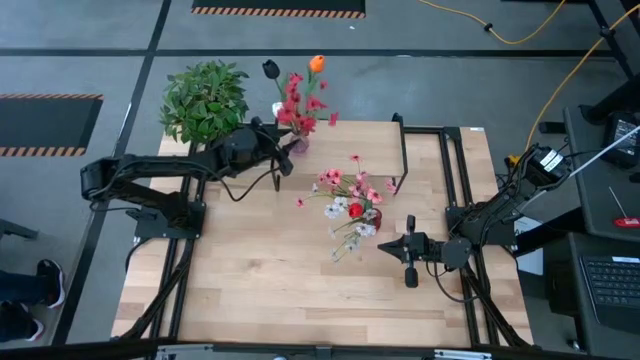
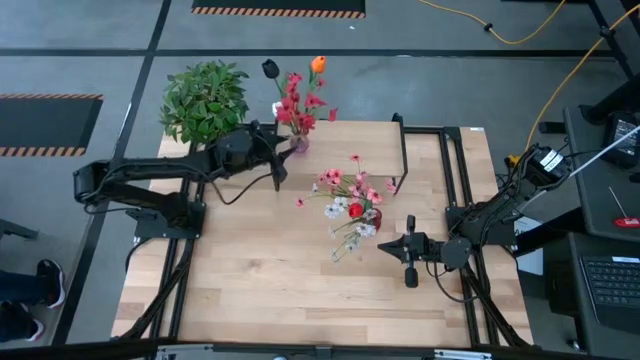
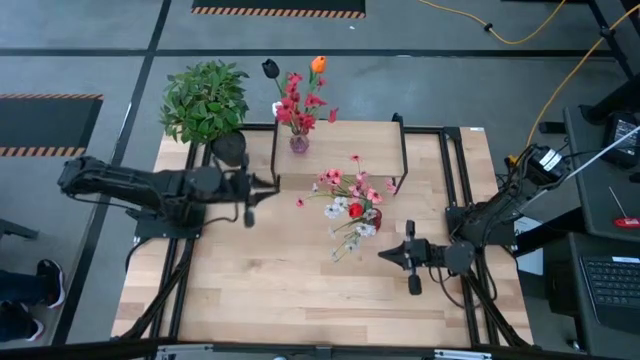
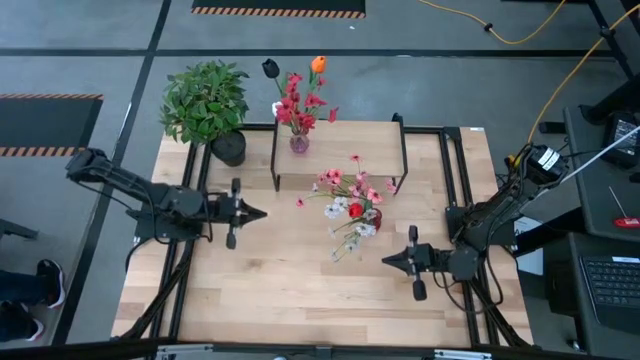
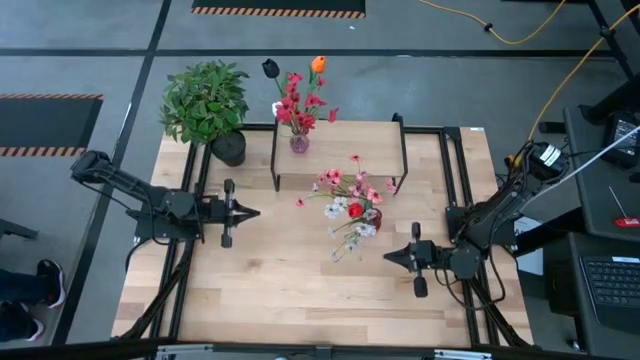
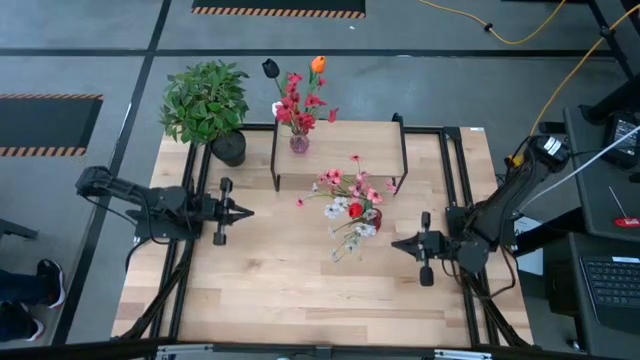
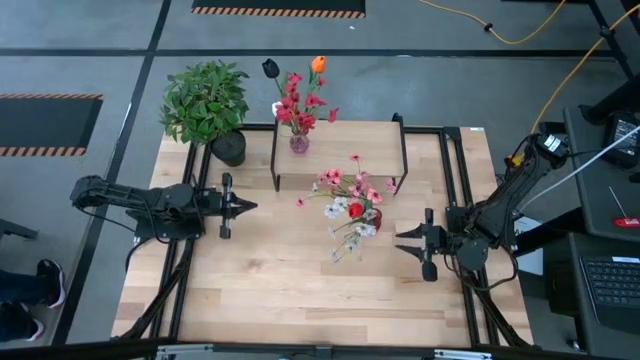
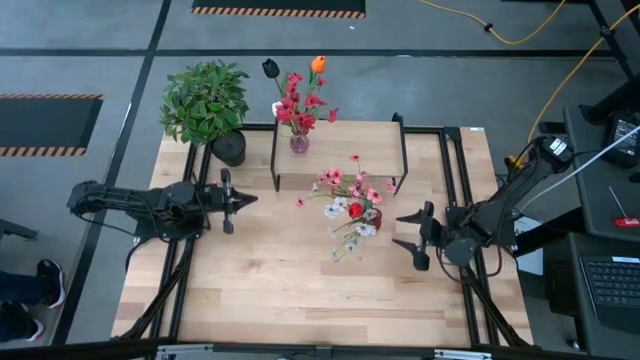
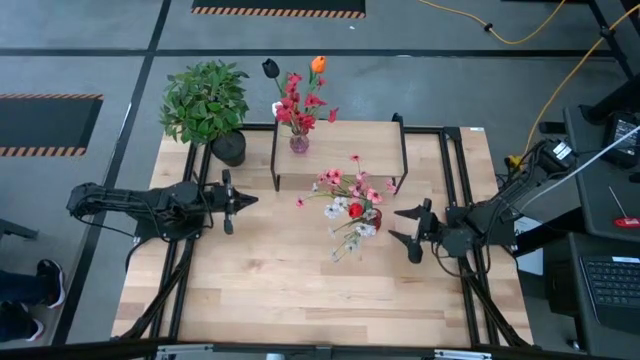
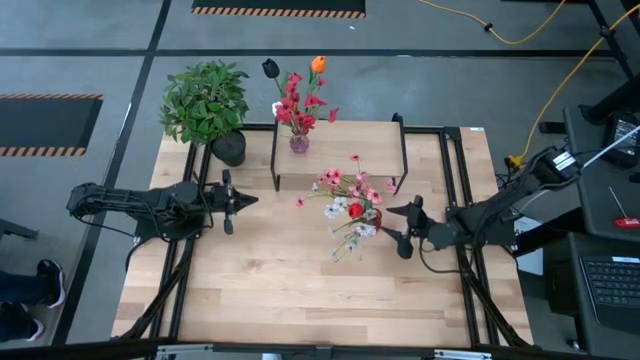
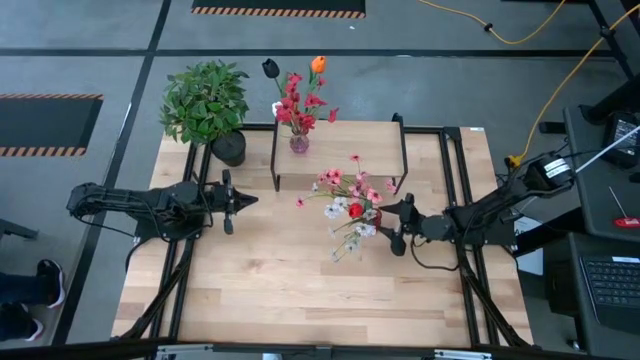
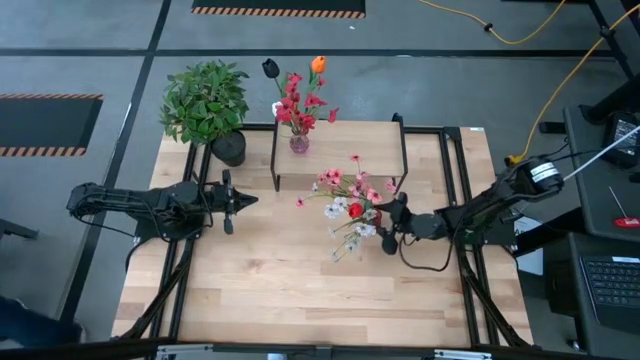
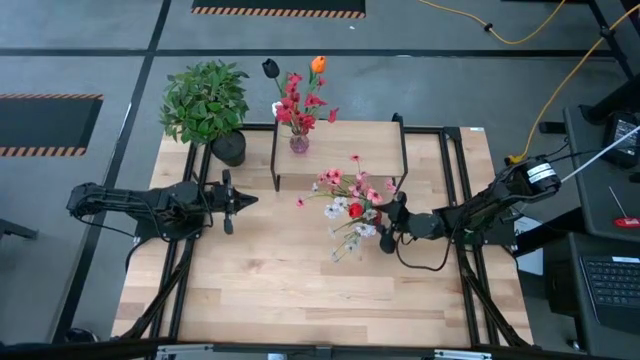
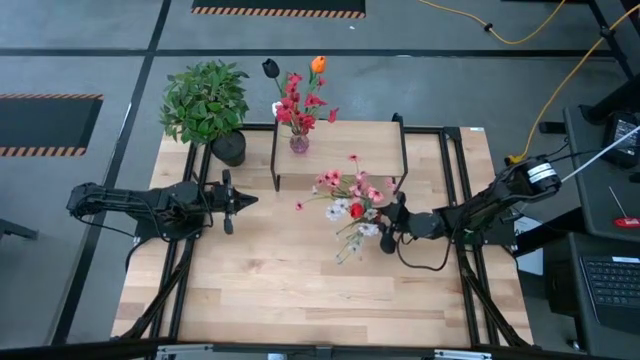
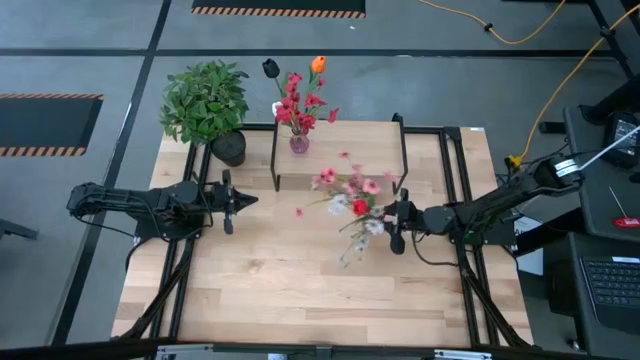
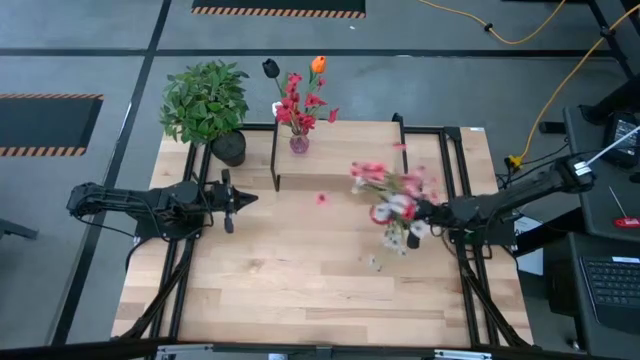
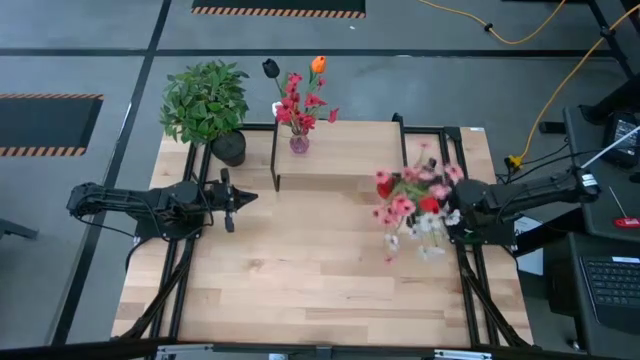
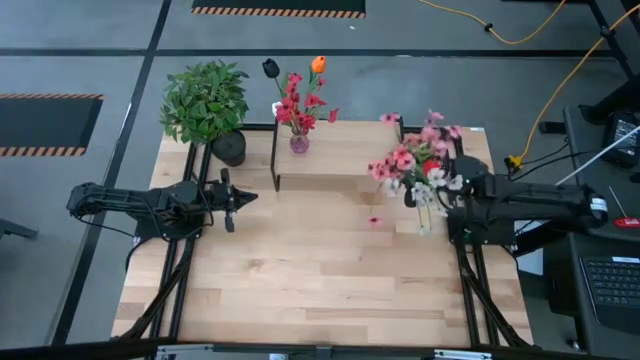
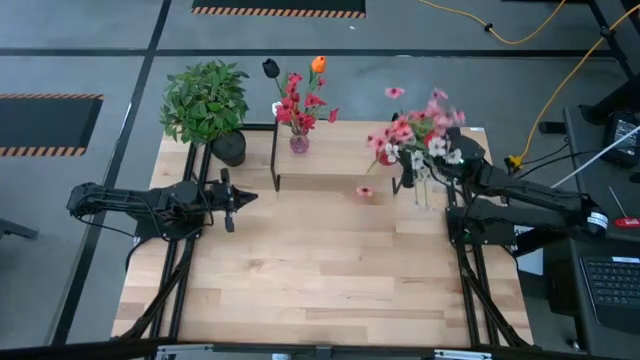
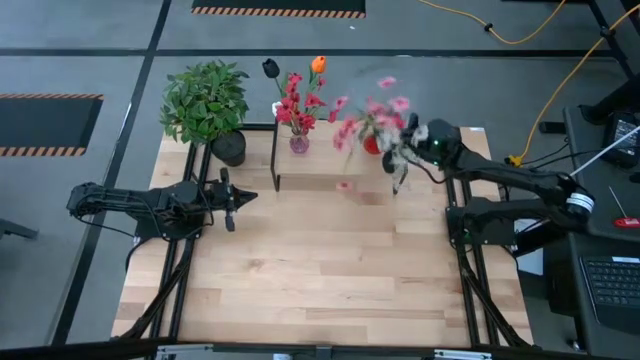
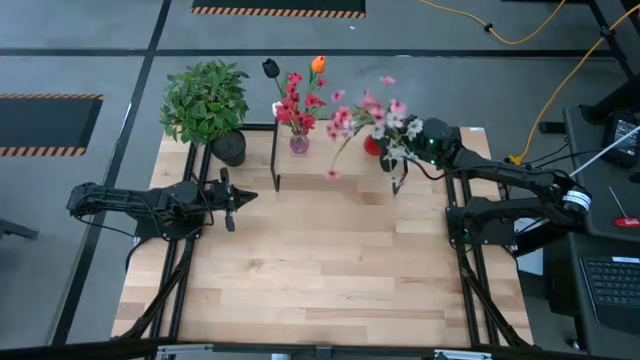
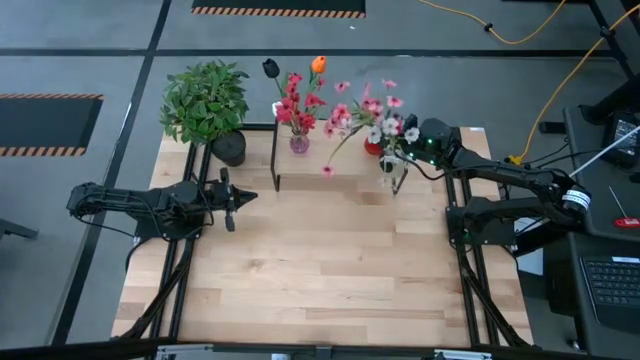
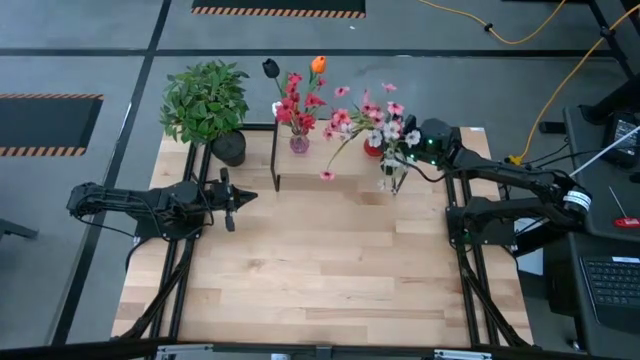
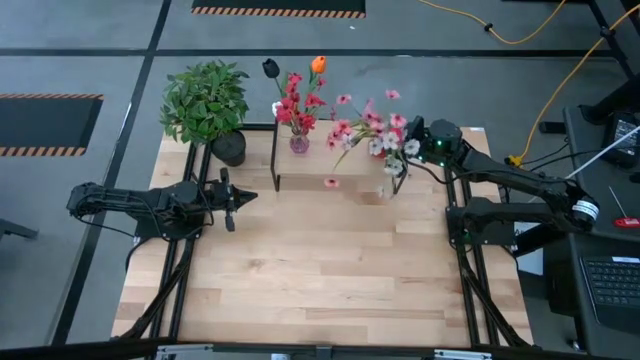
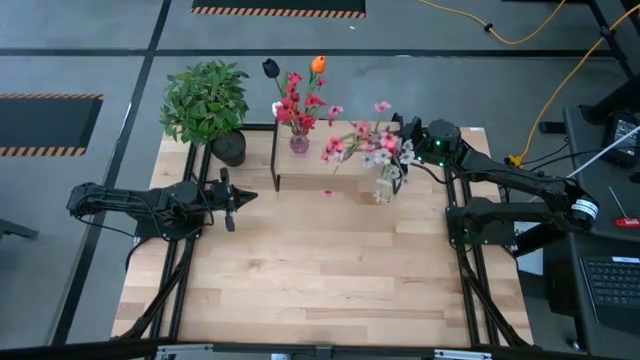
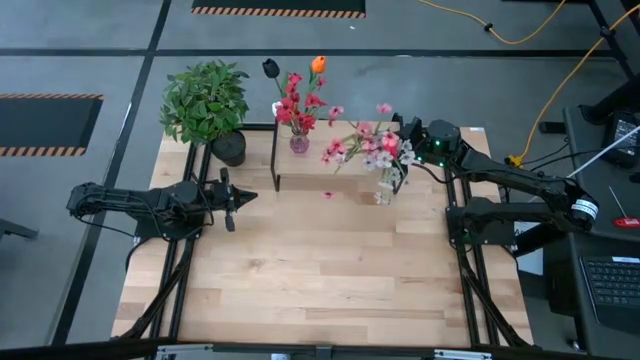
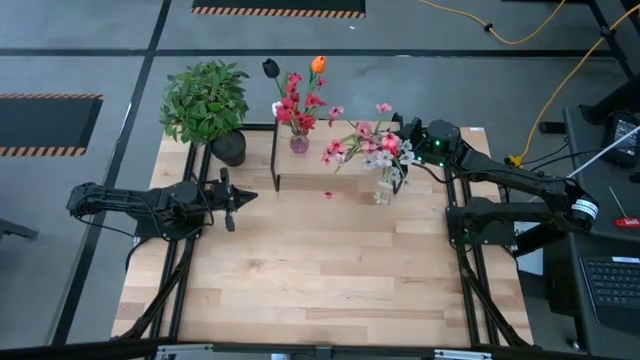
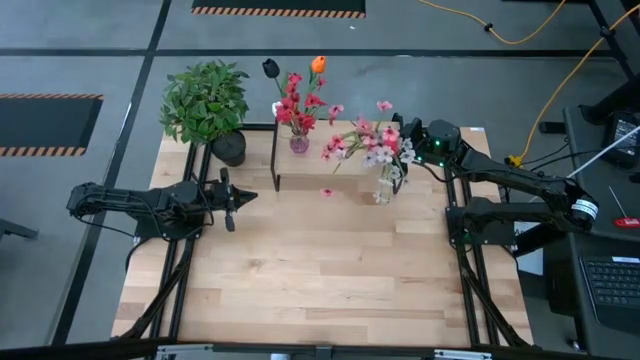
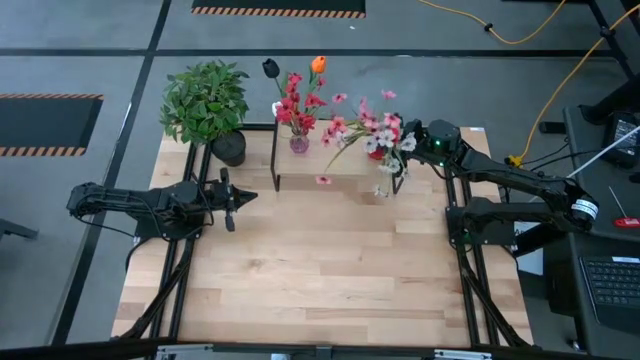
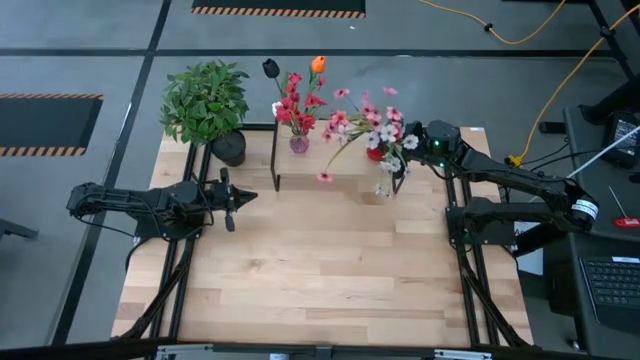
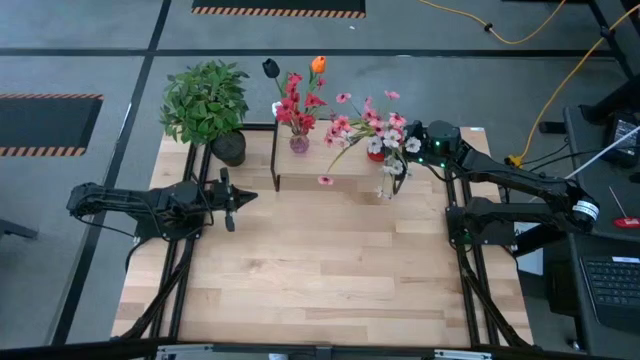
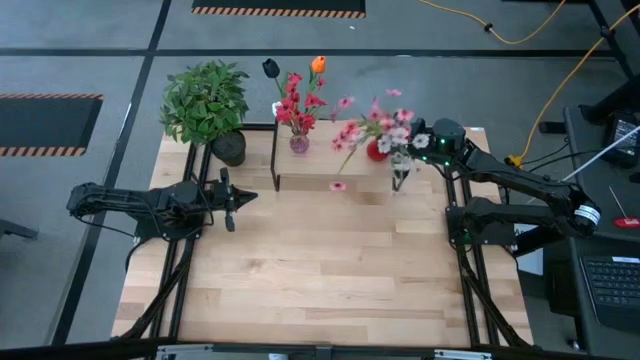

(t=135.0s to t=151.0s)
Task: Pick and place flowers into a vace then onto a shelf
Put the red vase on the shelf

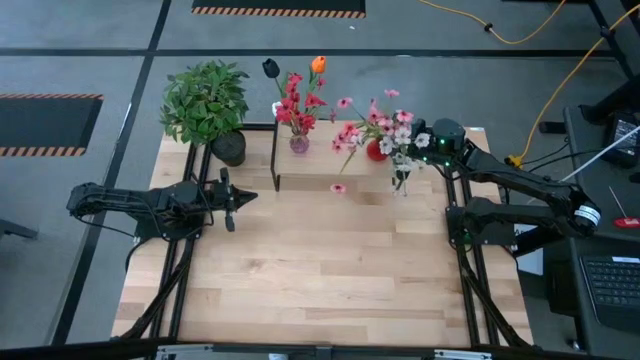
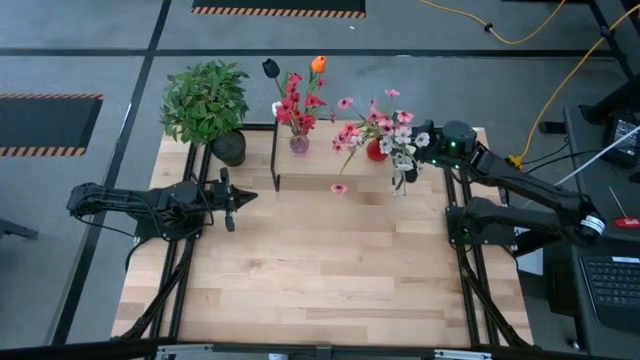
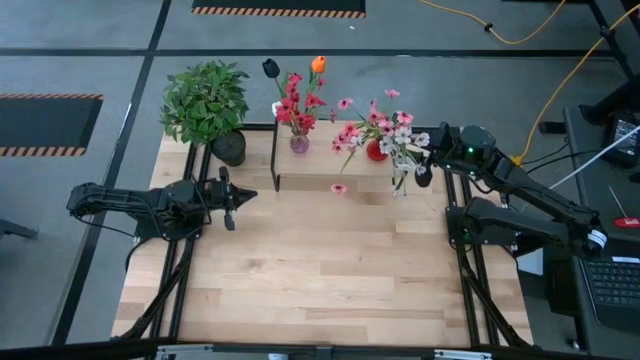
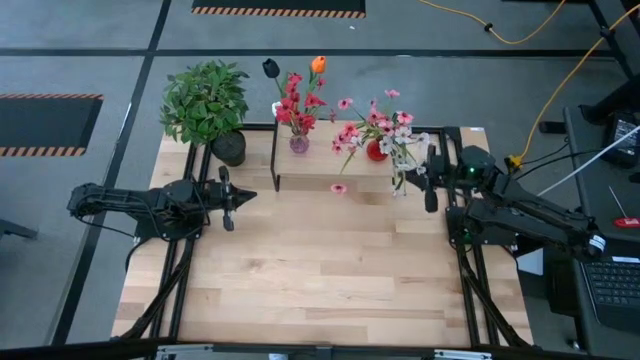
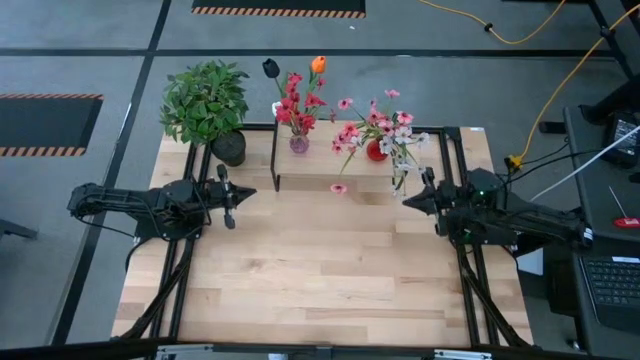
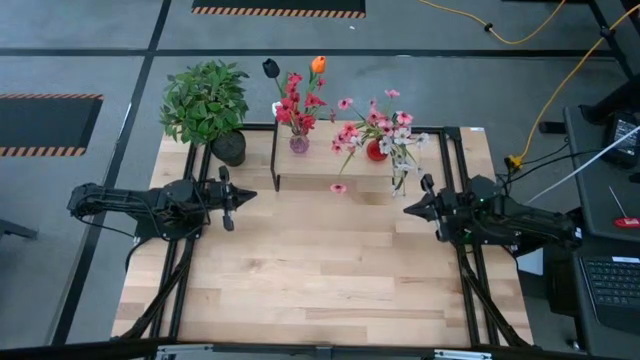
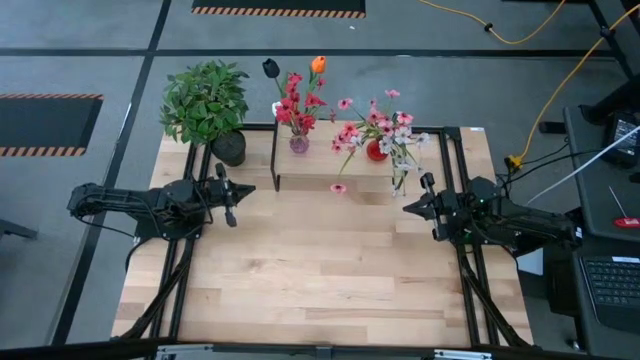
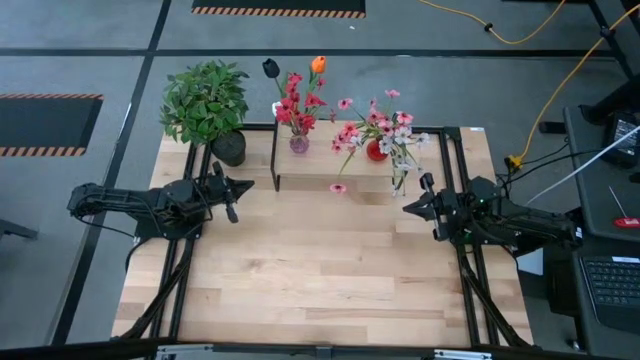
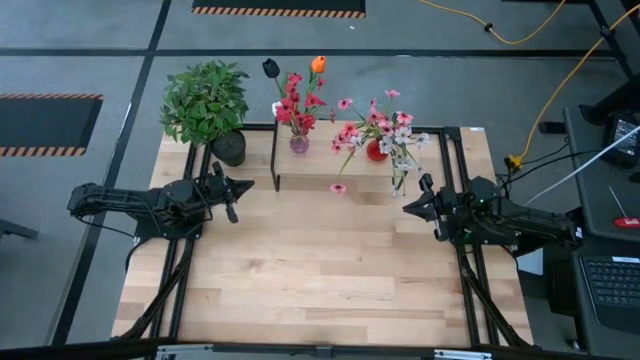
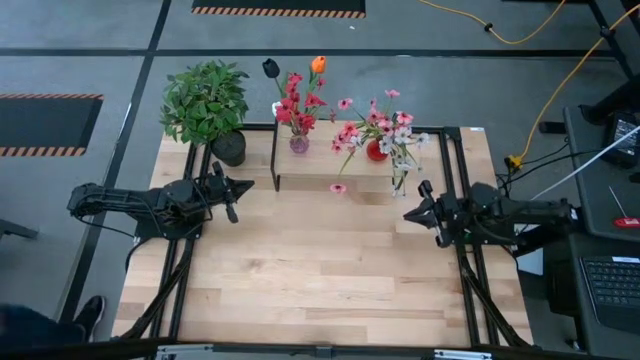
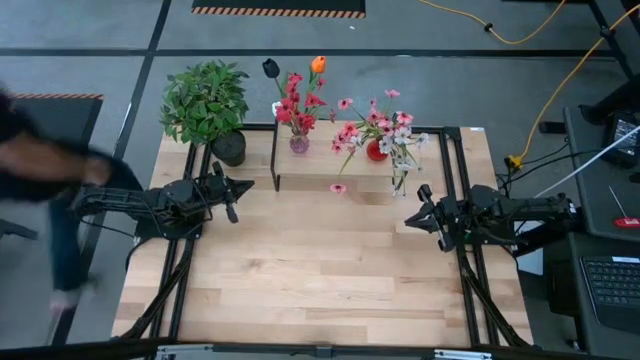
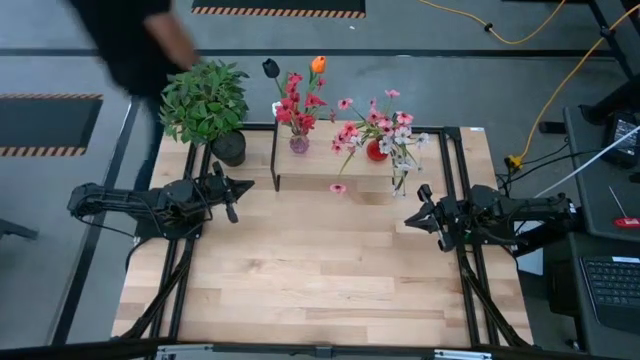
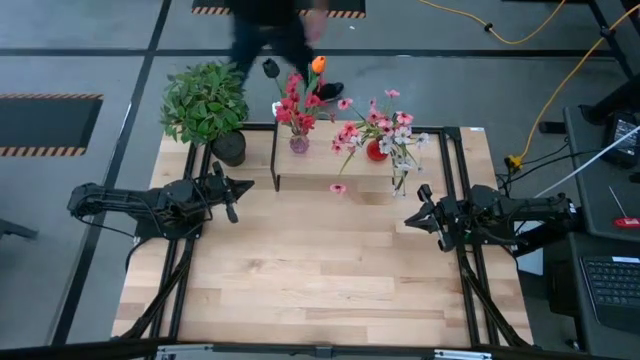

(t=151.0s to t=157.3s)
Return to Home Position
